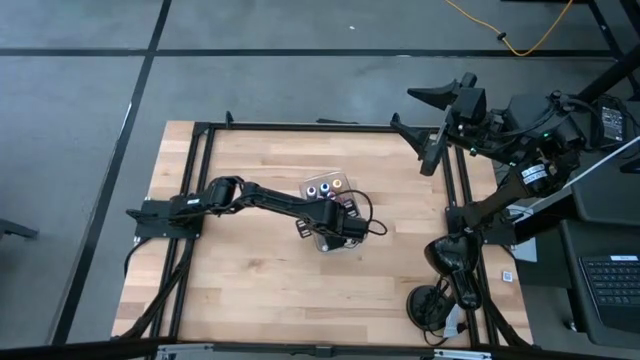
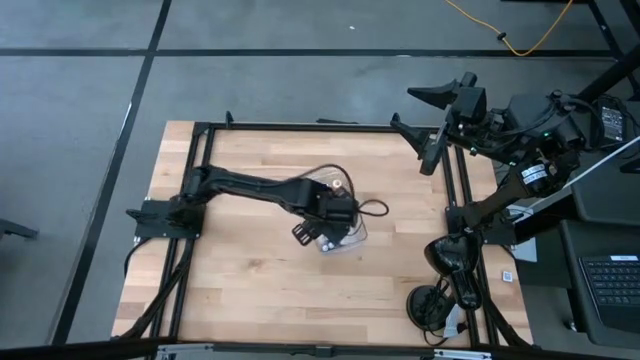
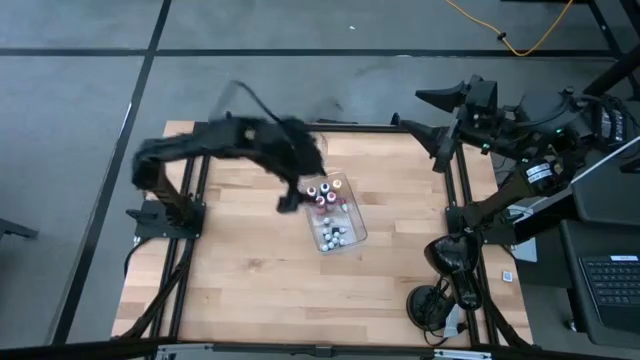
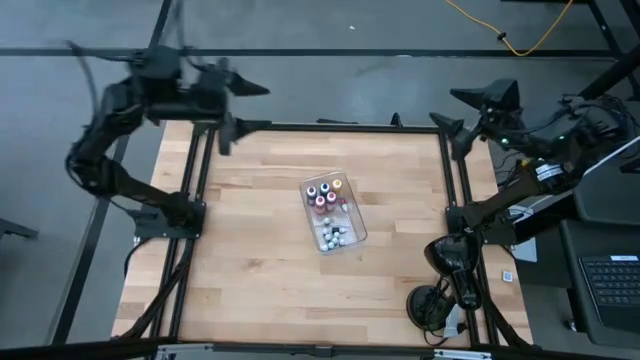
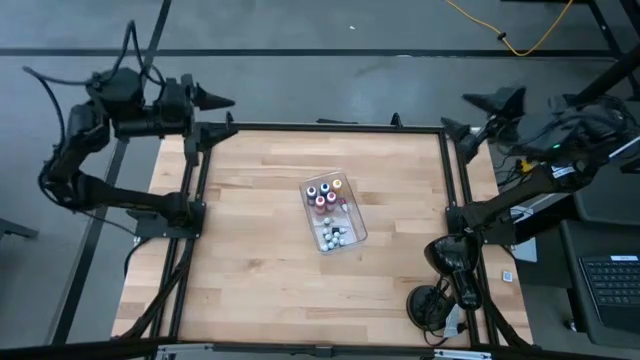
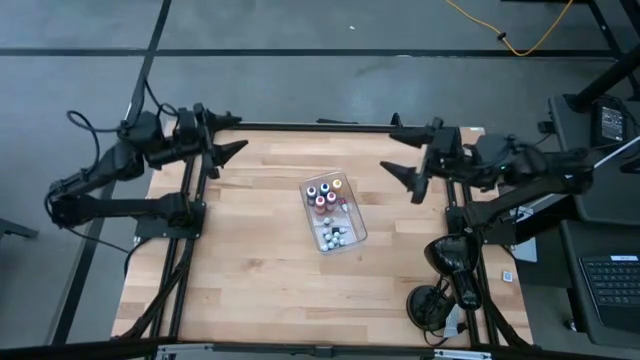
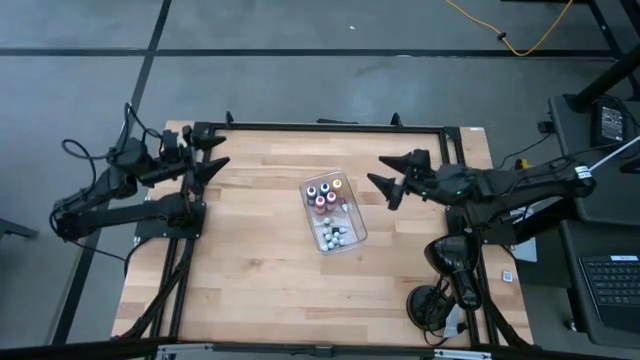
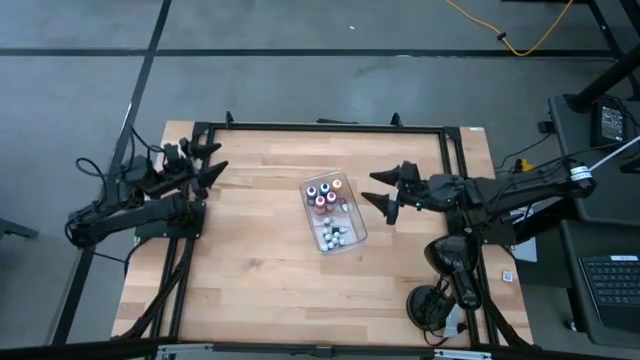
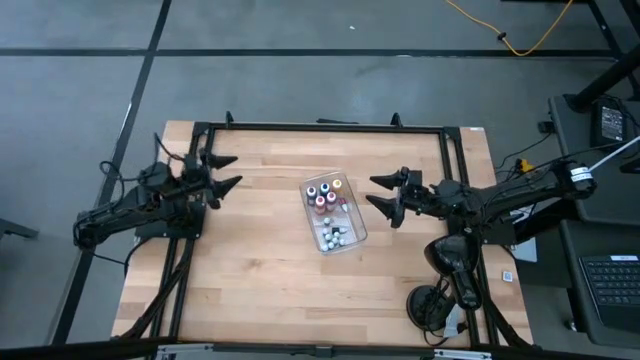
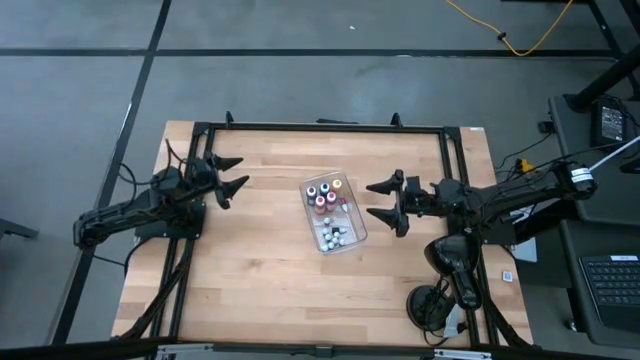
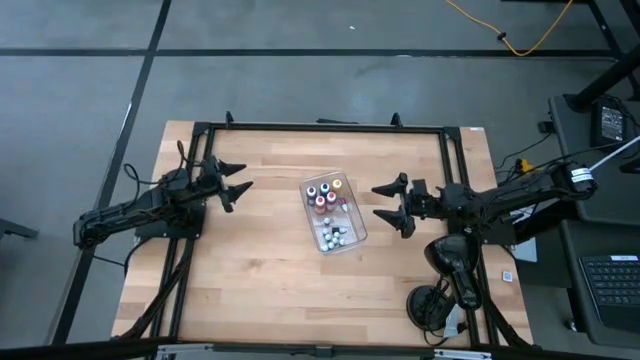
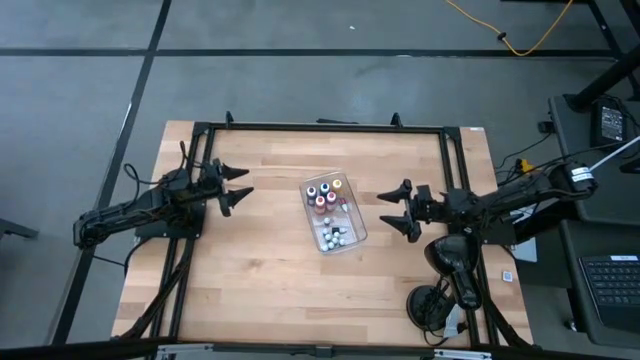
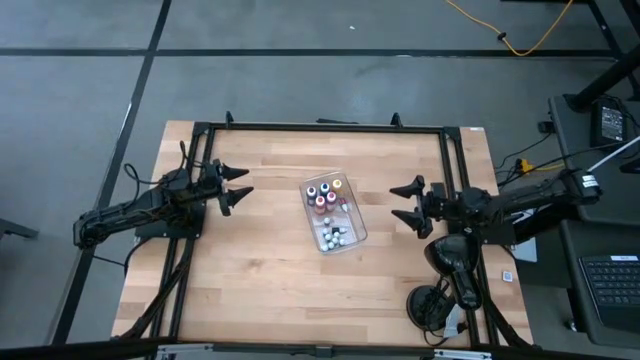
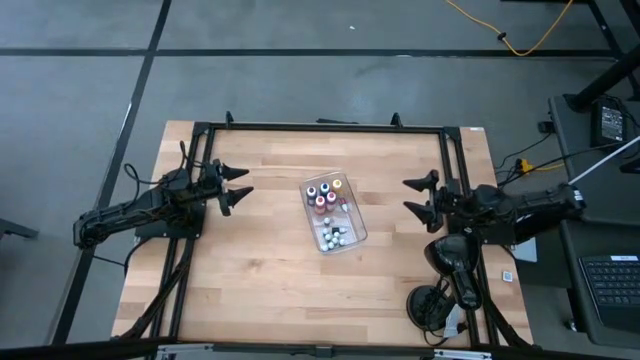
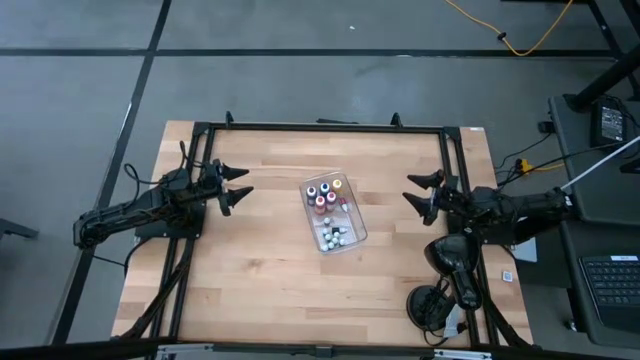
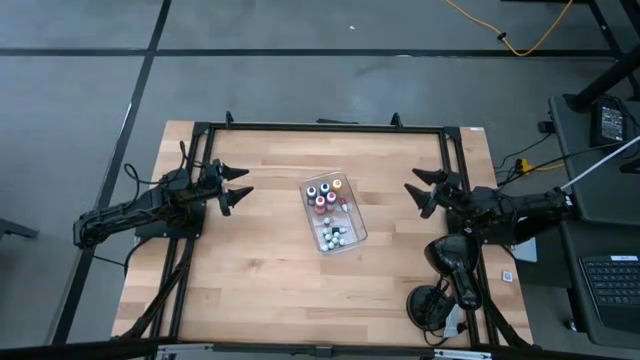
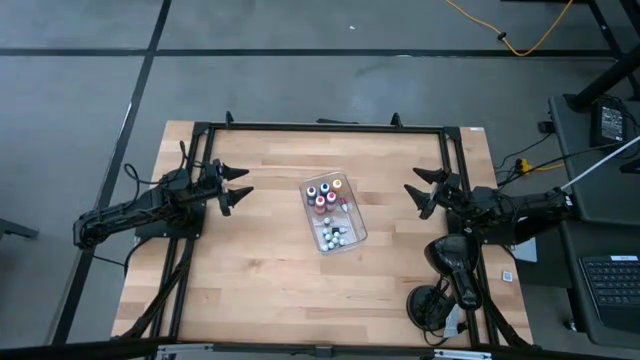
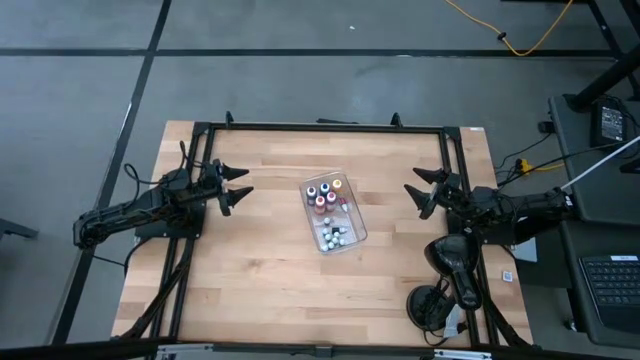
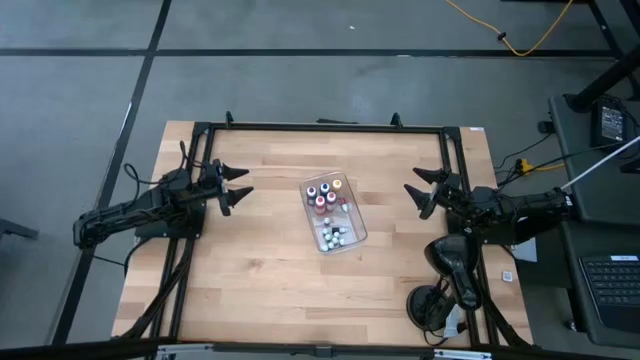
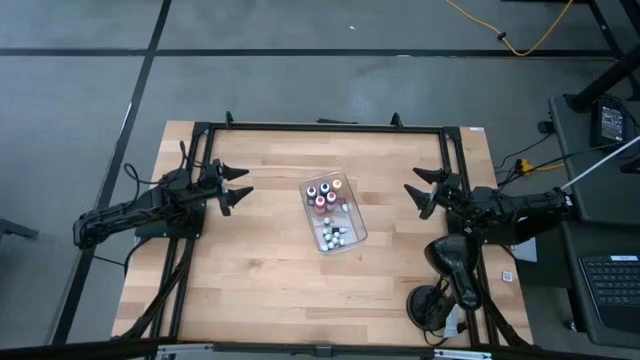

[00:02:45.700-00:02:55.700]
Task: Pick & Place food coloring
Return to Home Position

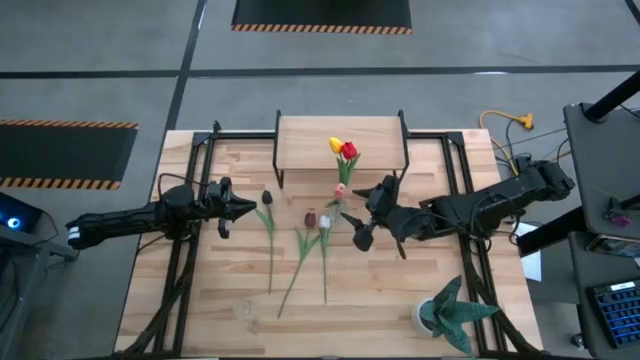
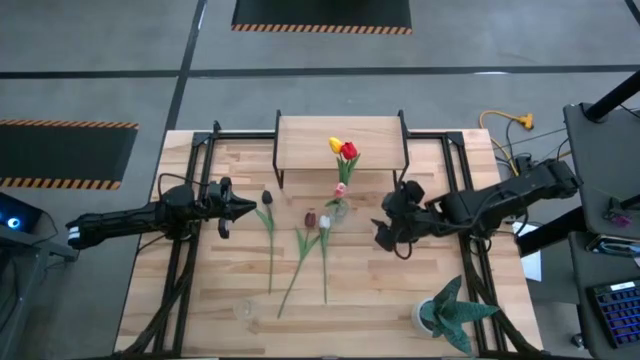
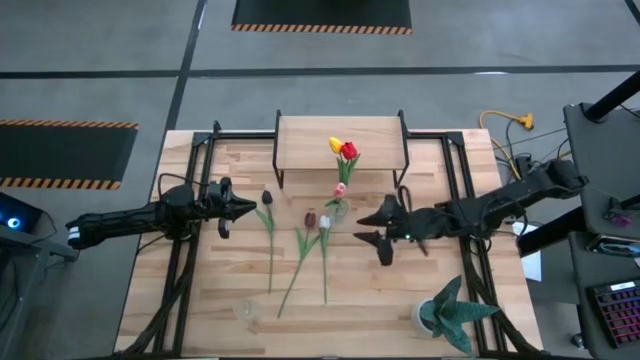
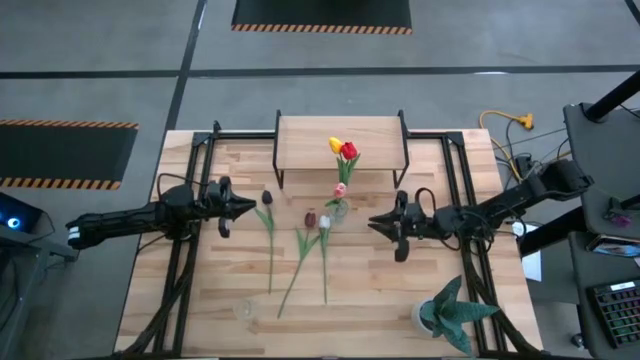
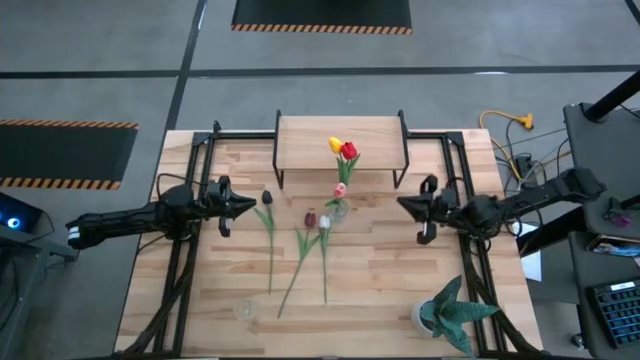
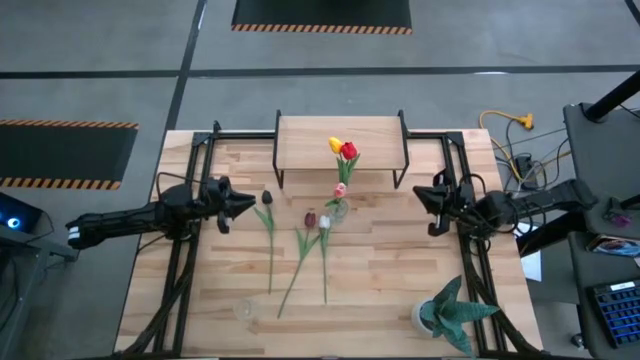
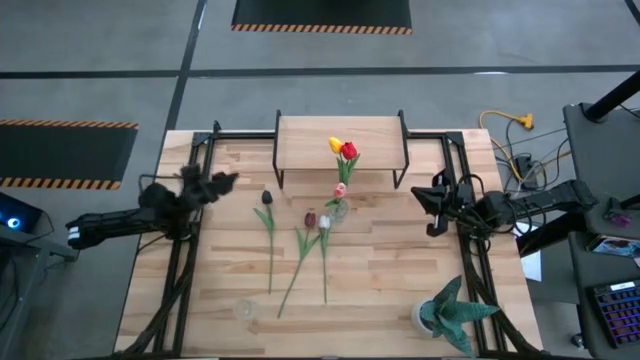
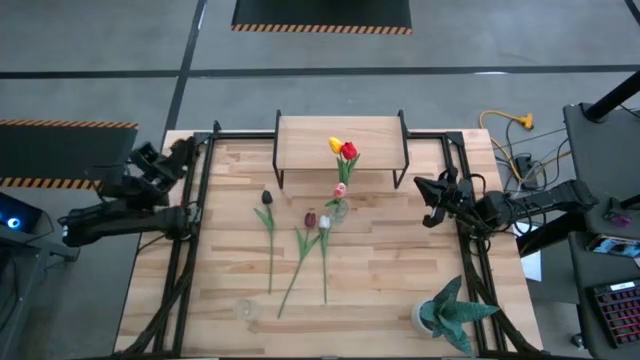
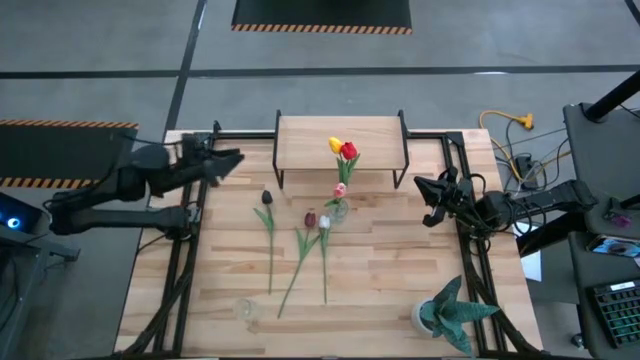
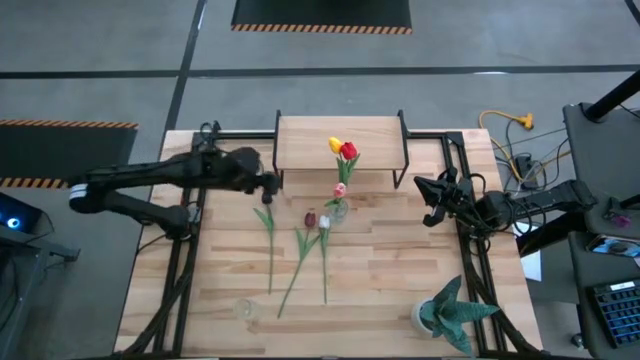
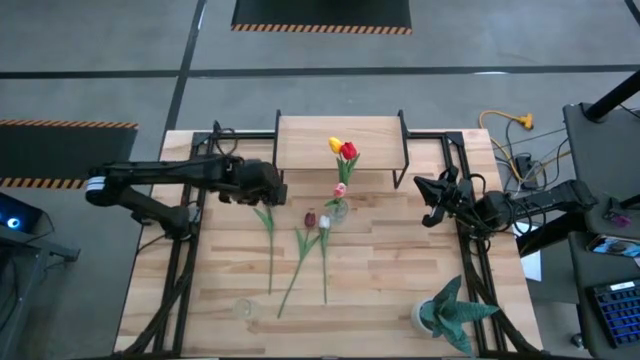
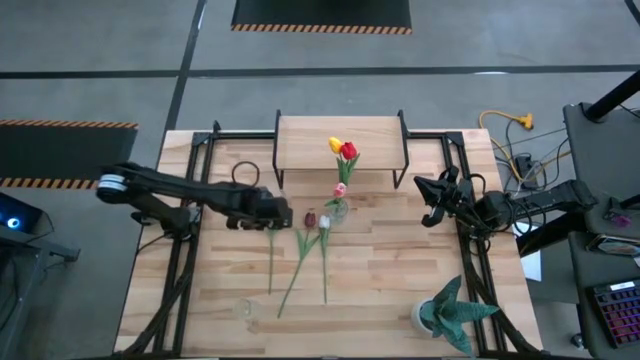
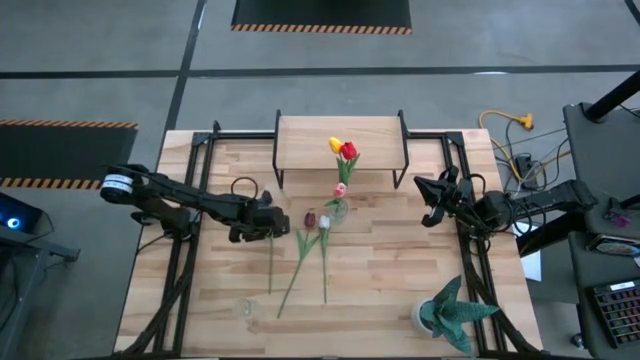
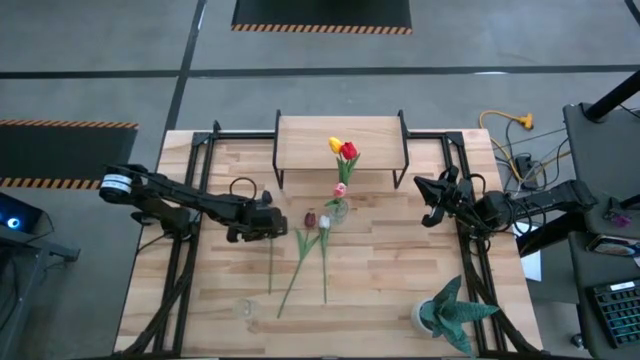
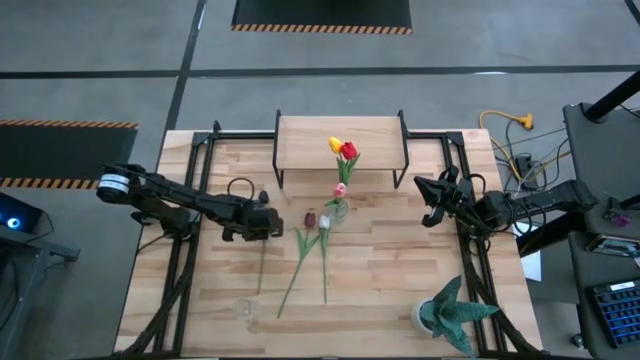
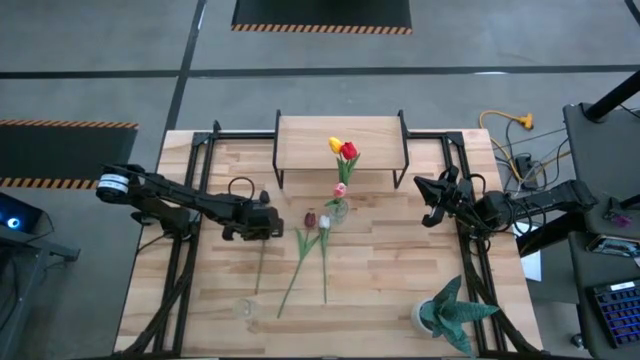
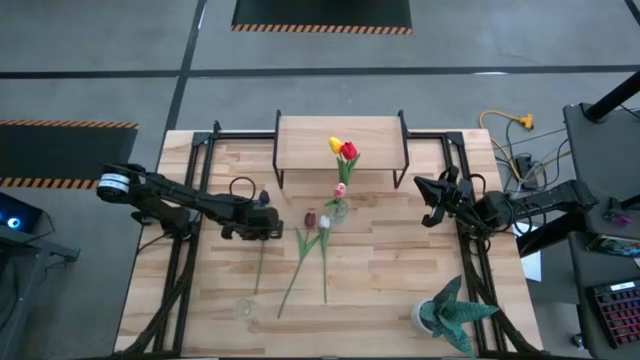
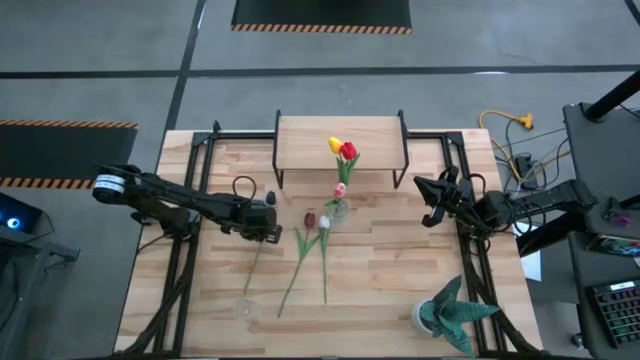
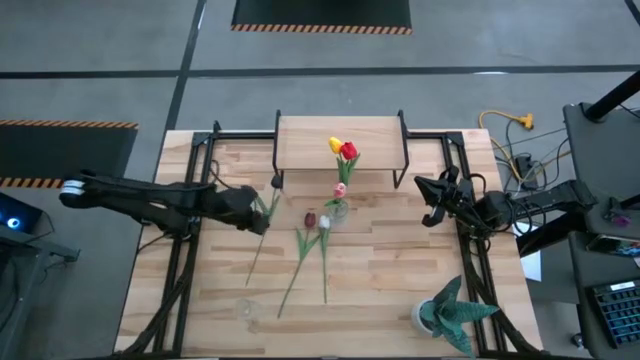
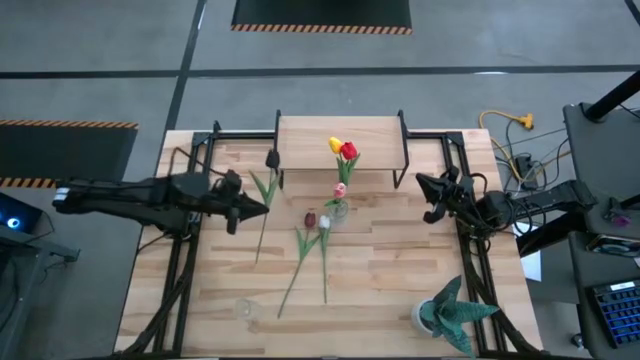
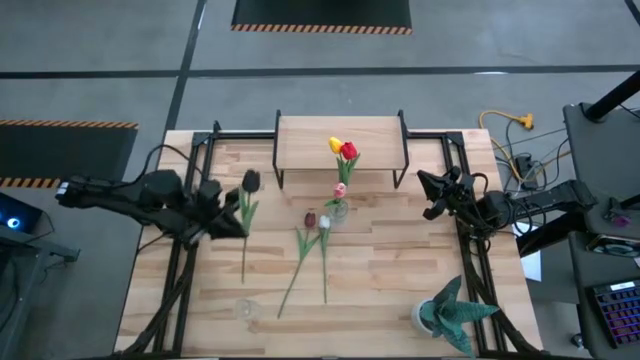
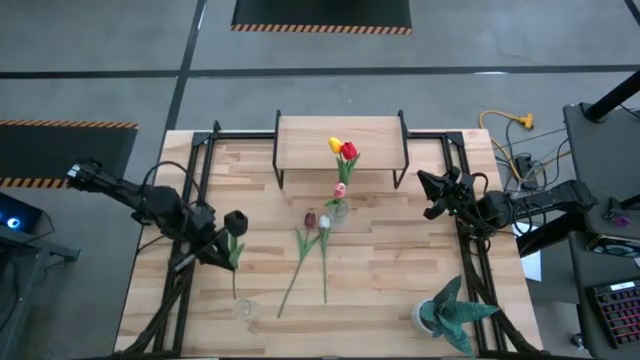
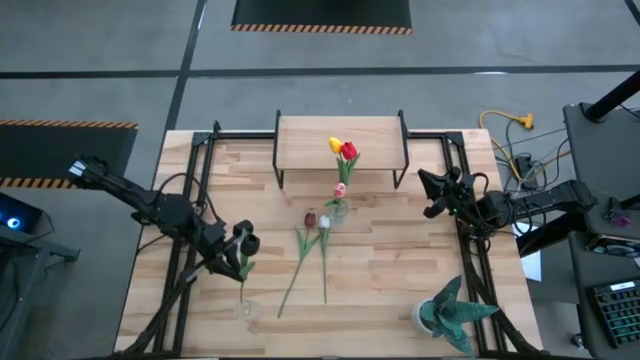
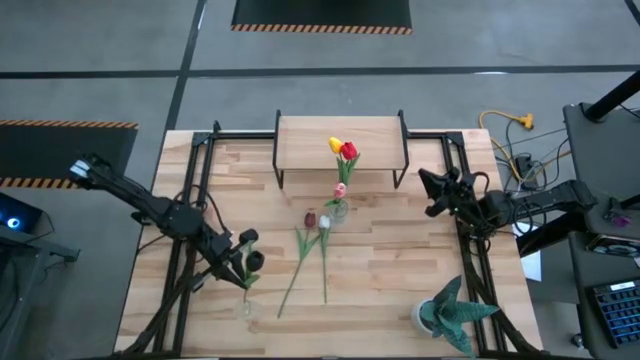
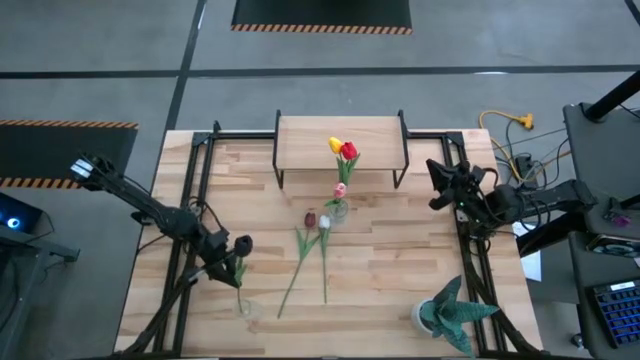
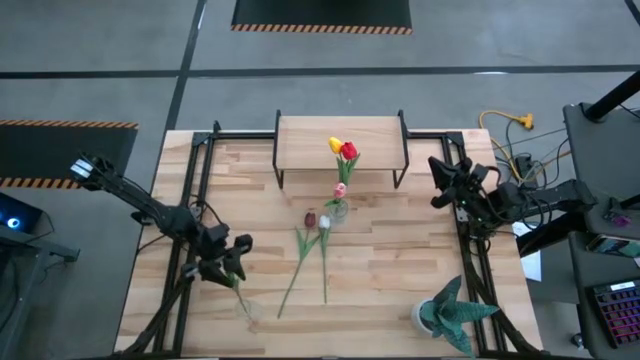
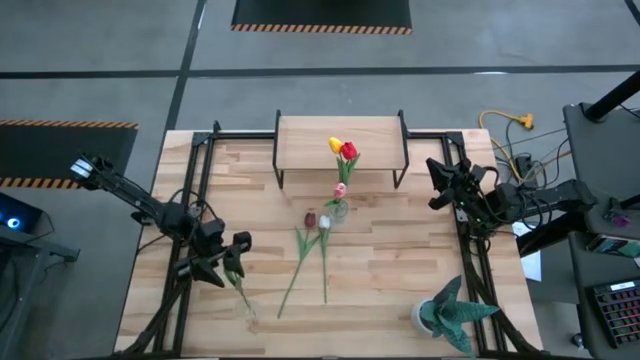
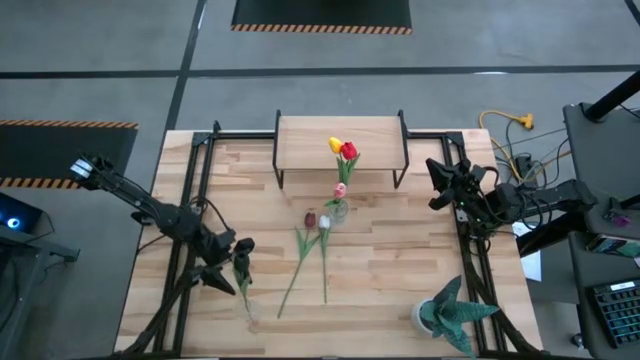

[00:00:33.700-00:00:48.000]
Task: Pick and place flowers into a vace then onto a shelf
Put the black tulip into the bottom transparent vase
